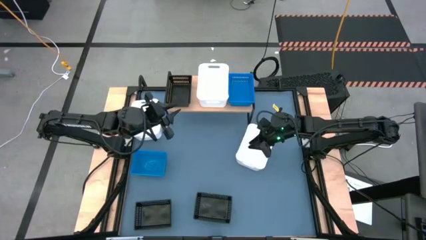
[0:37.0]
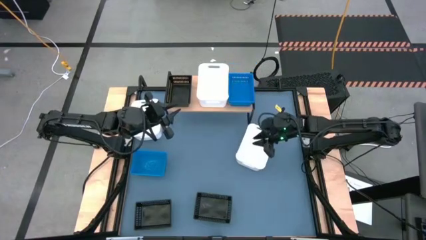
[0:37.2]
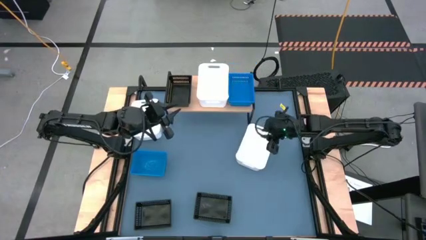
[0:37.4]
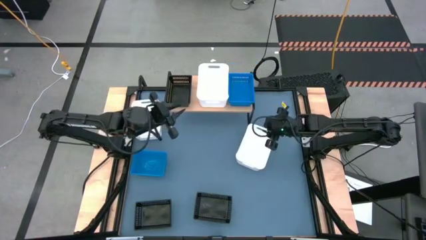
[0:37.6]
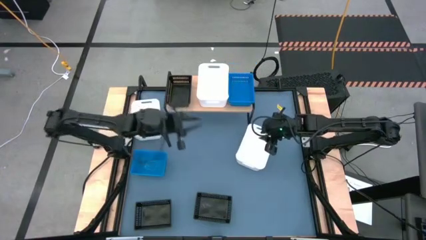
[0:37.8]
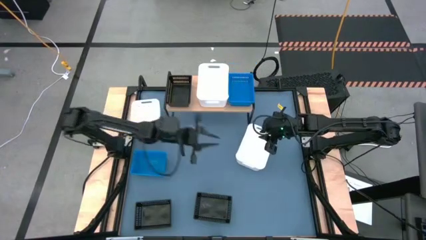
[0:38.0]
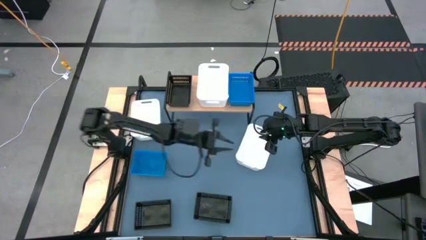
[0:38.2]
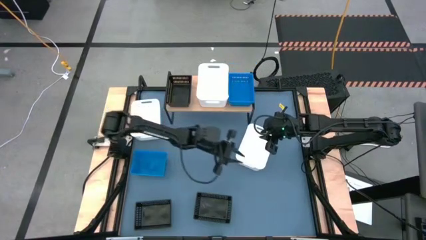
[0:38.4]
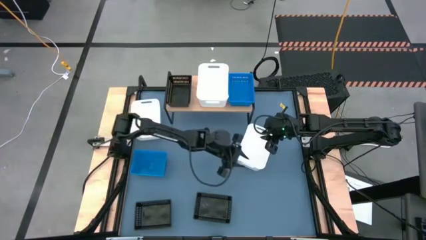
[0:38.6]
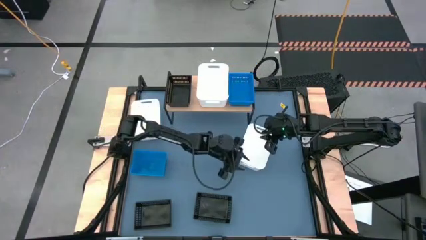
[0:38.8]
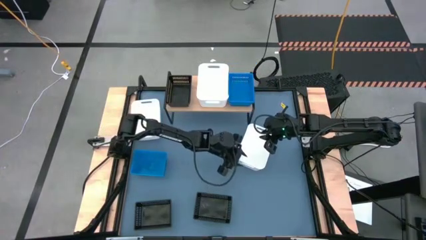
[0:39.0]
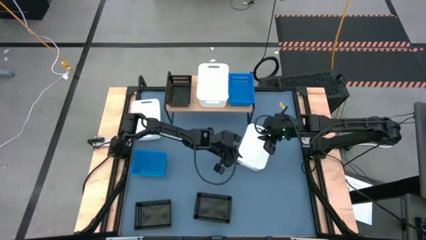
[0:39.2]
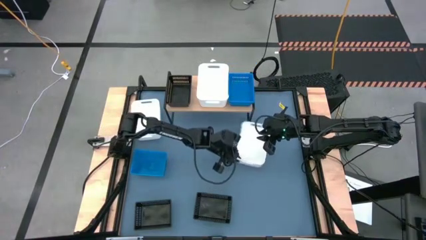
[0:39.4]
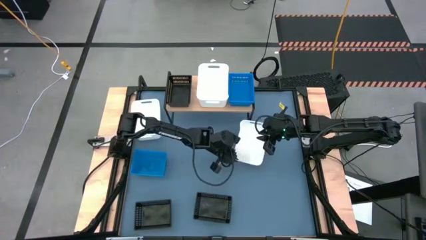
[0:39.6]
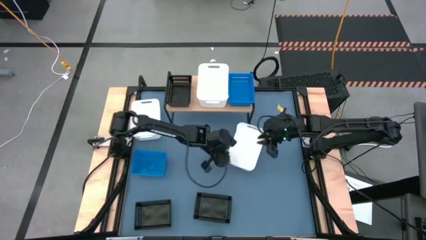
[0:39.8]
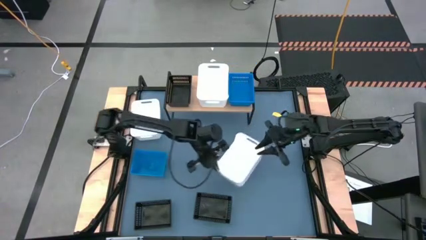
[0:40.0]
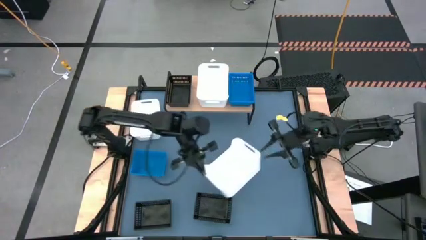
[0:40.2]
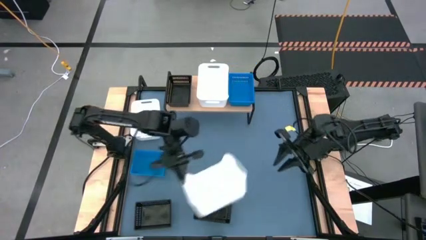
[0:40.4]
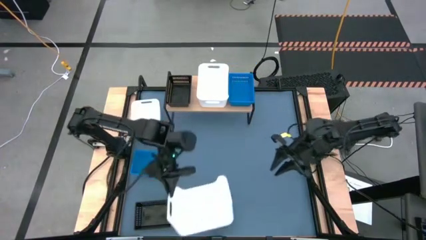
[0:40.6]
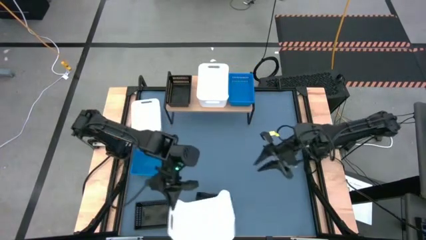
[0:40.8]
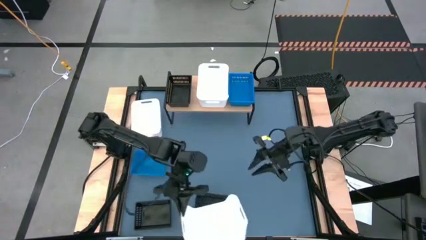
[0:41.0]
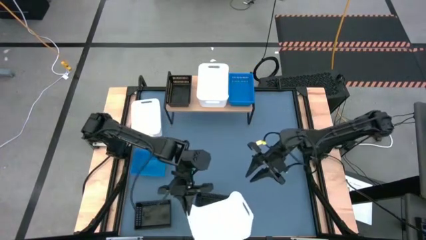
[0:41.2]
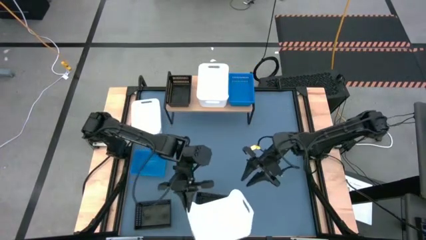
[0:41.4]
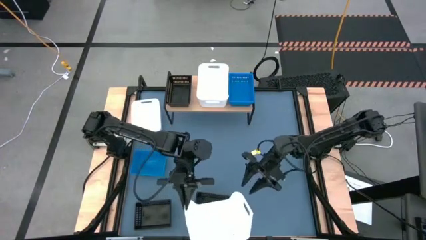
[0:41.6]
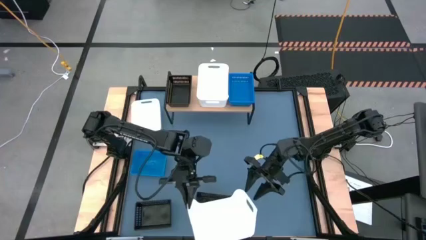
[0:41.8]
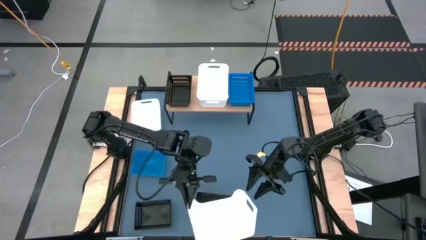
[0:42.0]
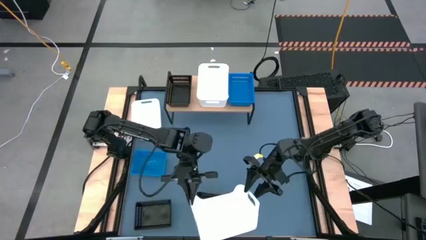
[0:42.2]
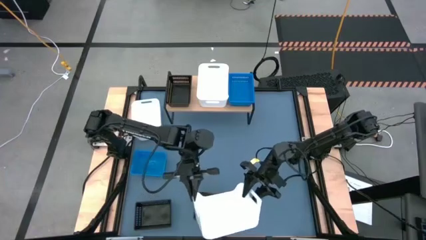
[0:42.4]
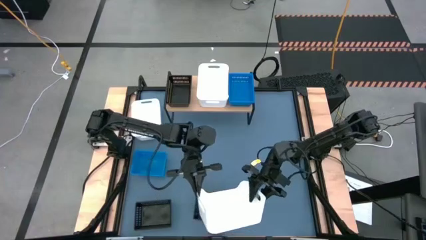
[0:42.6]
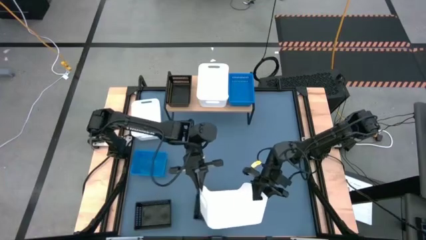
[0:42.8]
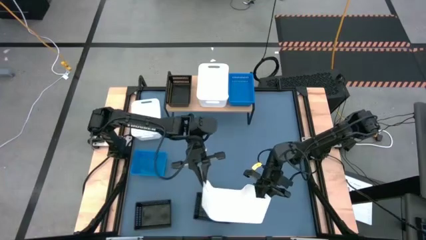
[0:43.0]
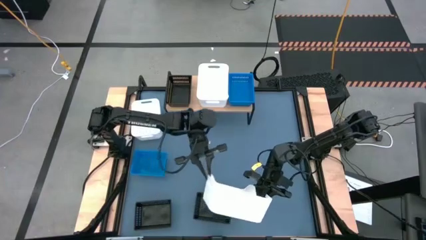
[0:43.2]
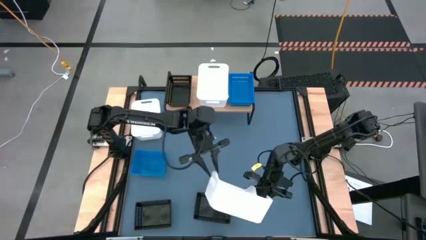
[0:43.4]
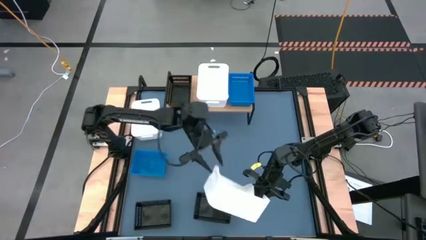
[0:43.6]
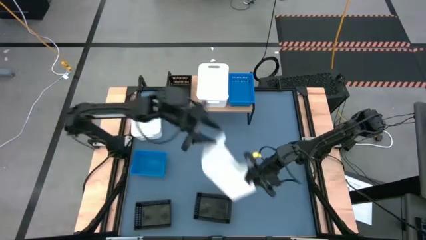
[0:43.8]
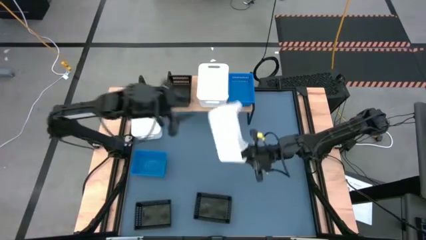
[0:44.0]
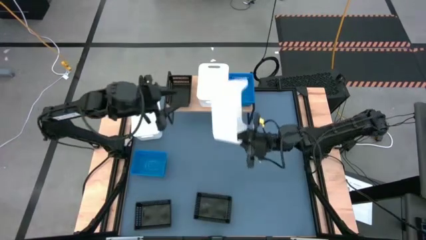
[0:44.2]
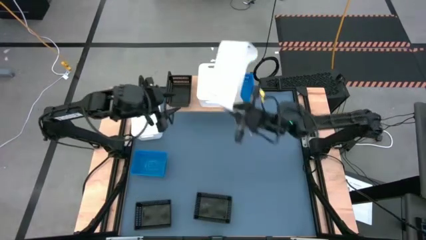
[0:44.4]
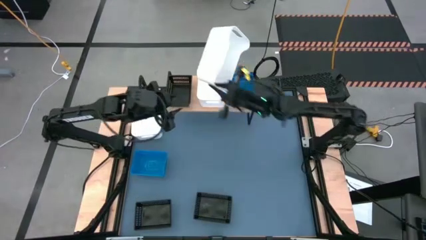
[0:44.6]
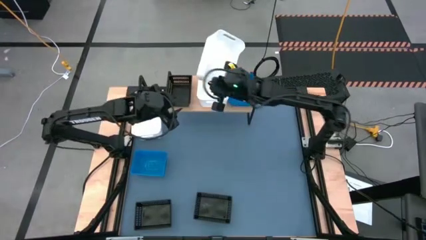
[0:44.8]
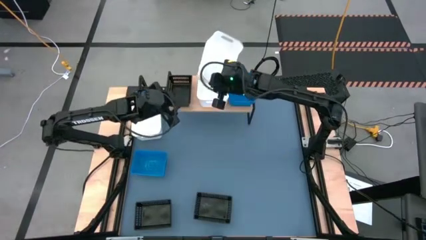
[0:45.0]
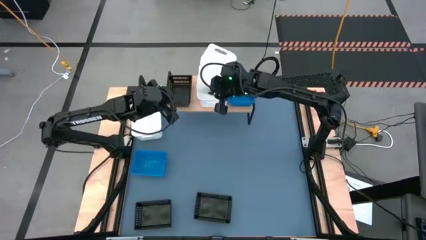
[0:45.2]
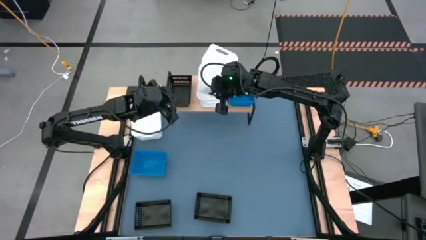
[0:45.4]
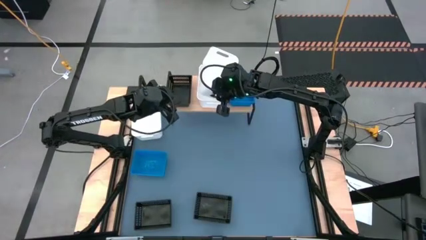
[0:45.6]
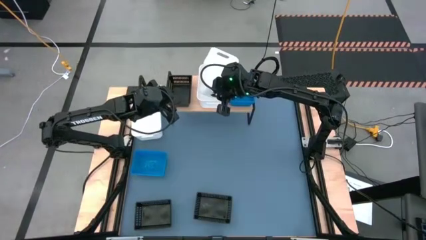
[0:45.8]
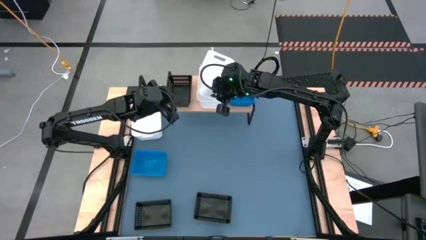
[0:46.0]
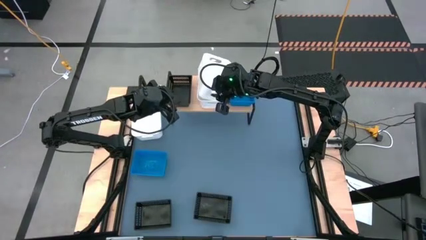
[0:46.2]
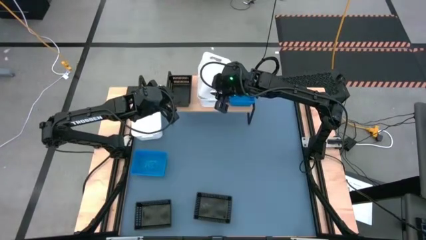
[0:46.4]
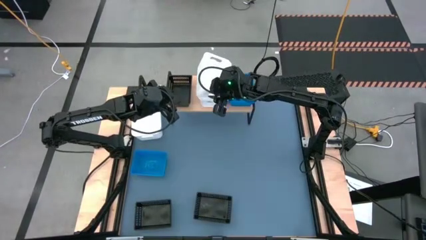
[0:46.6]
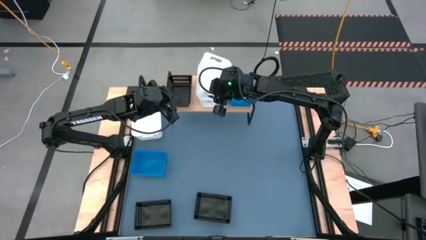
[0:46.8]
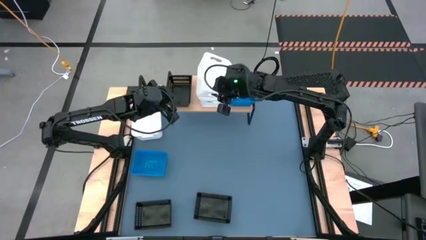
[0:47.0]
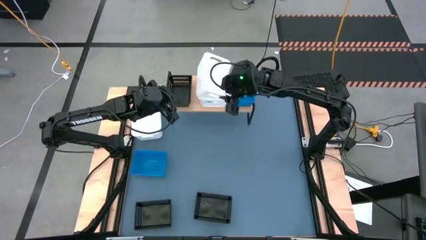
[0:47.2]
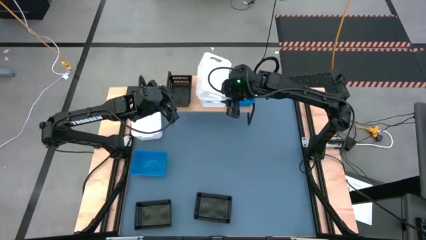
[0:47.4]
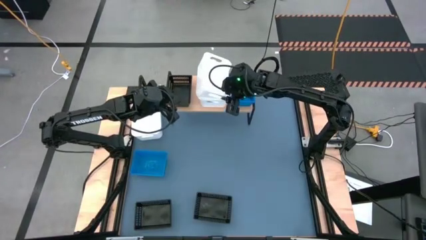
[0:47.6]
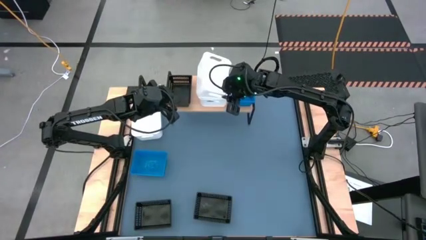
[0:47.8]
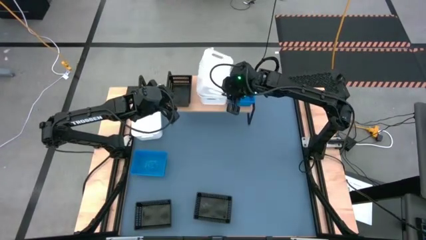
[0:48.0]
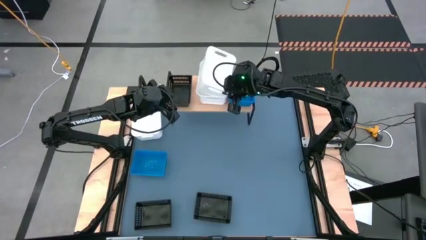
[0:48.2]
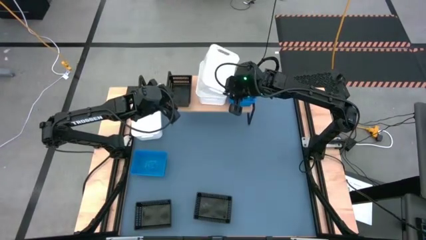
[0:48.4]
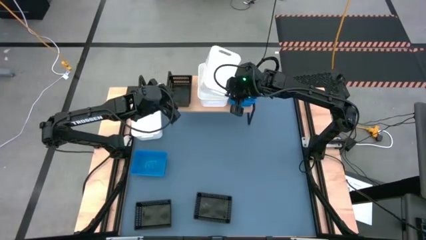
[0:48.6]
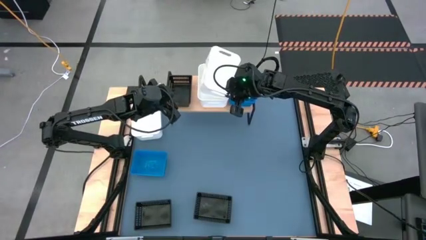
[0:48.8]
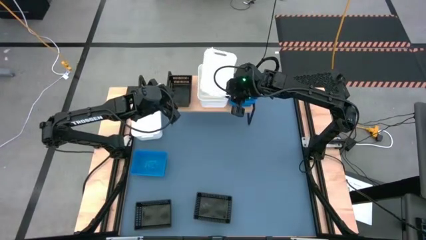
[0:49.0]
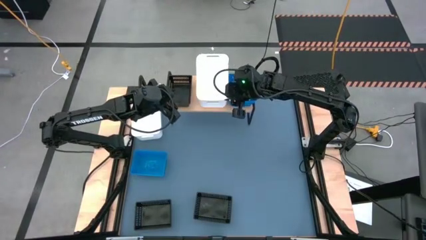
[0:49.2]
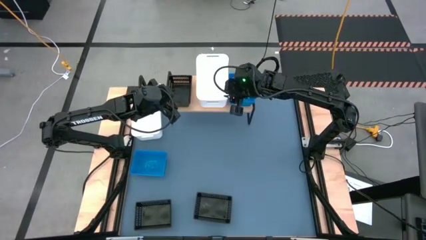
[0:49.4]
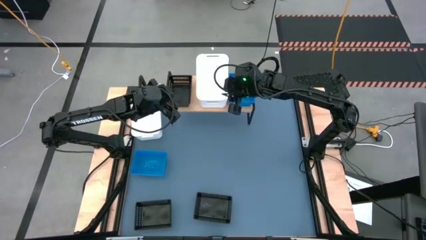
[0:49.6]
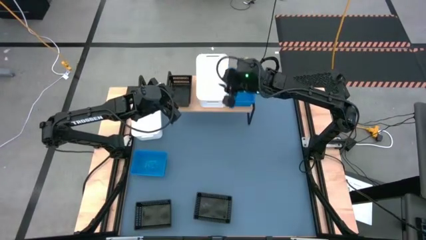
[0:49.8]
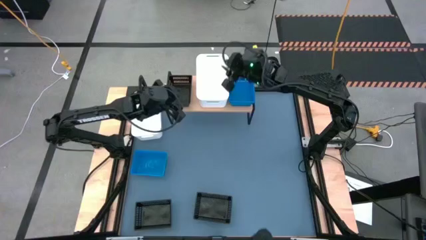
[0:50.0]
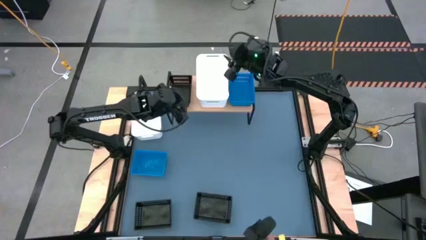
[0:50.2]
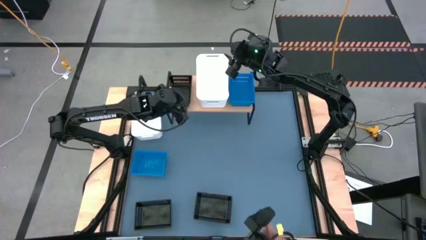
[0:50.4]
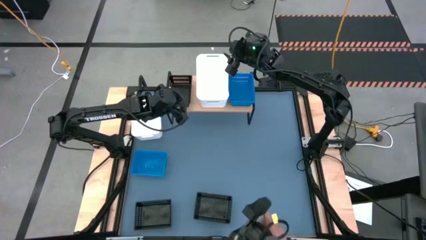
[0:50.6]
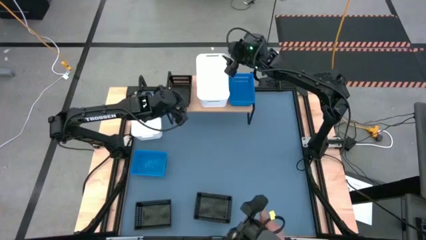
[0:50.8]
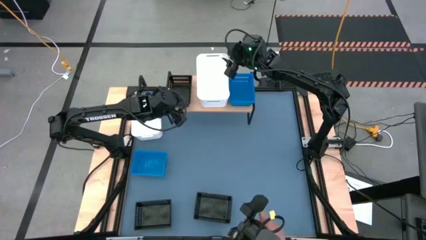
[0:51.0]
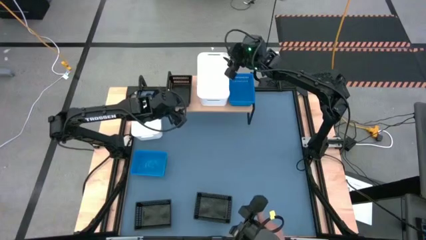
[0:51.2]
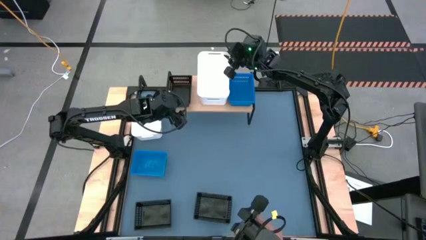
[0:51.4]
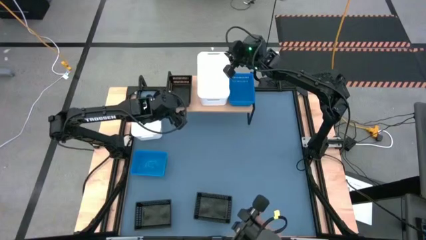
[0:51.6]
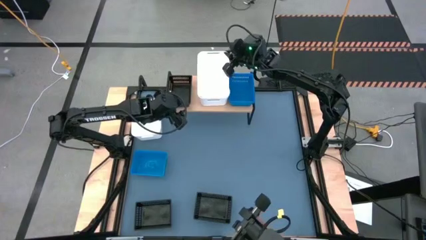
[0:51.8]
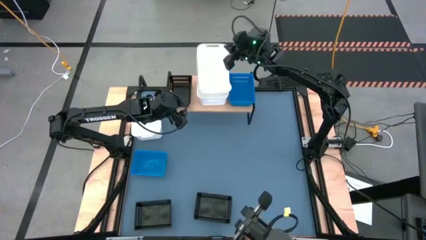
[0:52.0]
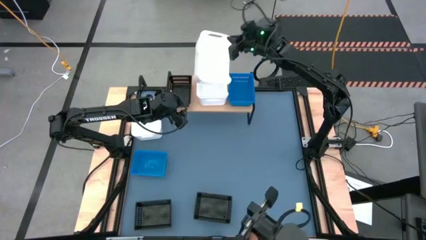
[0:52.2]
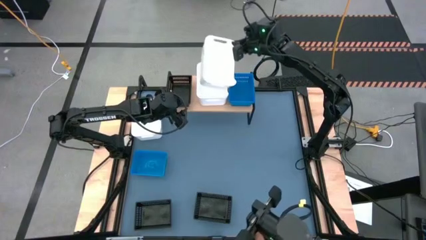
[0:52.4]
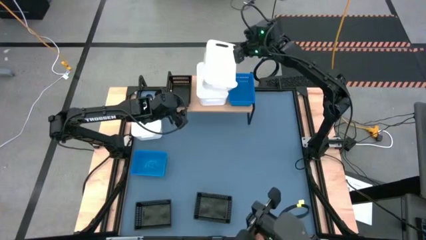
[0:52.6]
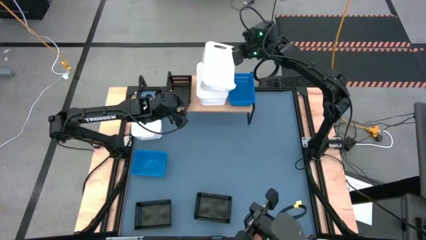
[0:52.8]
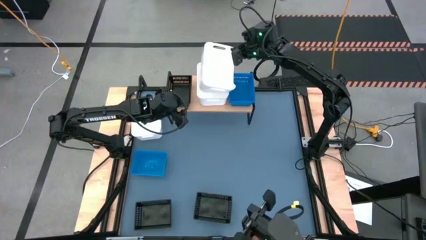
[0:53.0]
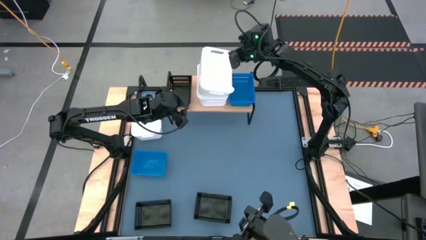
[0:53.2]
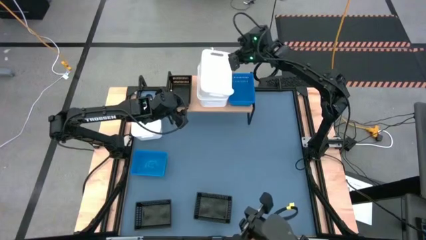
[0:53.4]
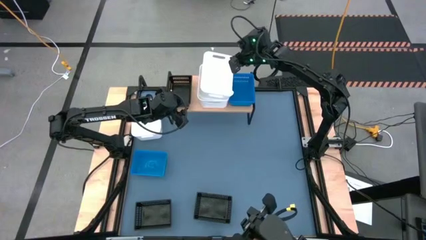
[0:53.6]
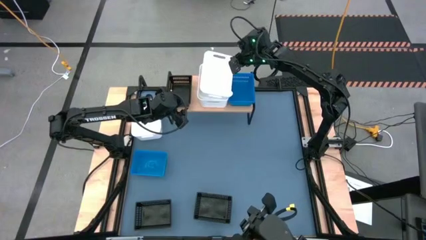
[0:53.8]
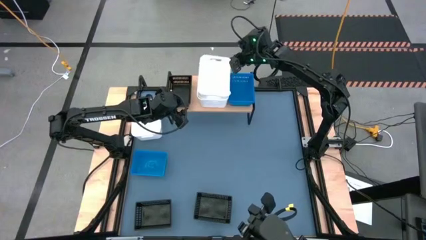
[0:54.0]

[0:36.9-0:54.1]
Task: Stack baskets on shelf by color
Stack the right white bin on top of the other white bin on the shelf
